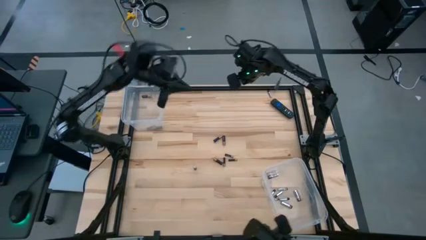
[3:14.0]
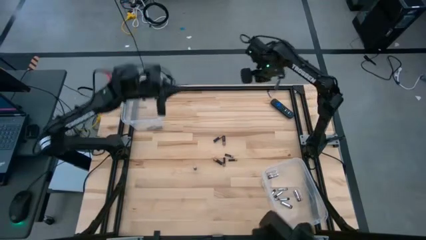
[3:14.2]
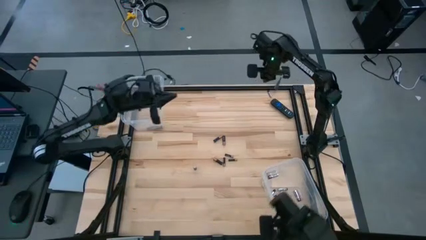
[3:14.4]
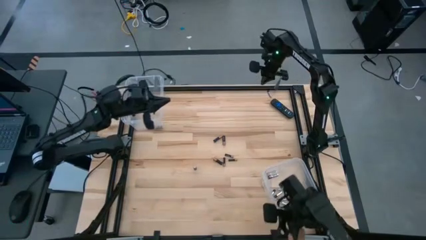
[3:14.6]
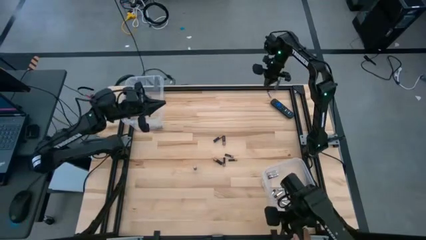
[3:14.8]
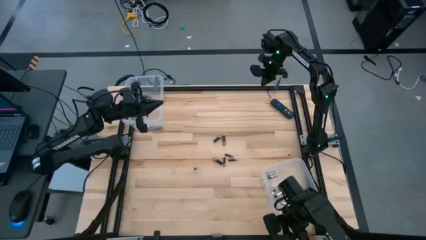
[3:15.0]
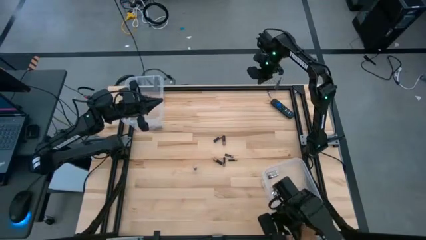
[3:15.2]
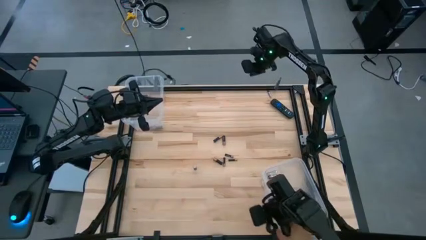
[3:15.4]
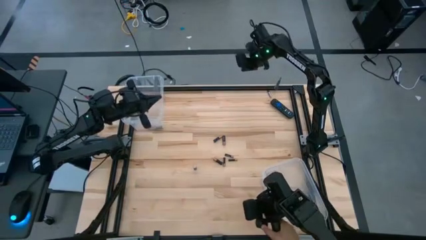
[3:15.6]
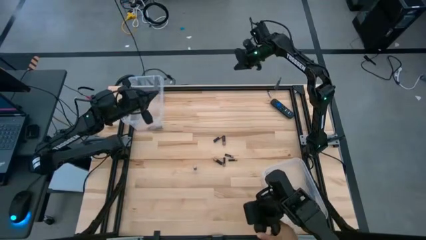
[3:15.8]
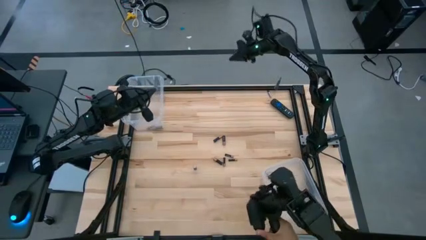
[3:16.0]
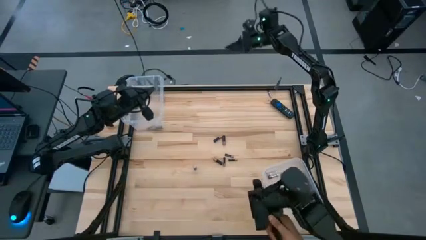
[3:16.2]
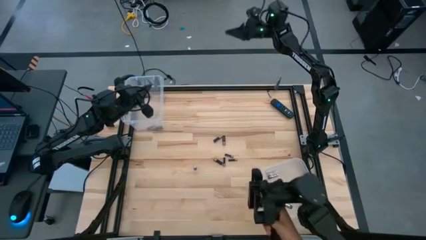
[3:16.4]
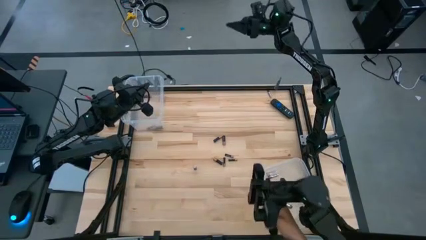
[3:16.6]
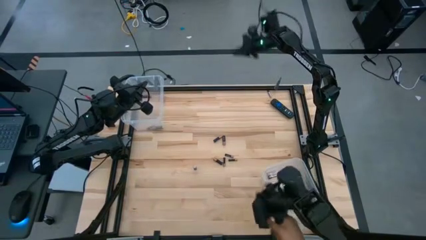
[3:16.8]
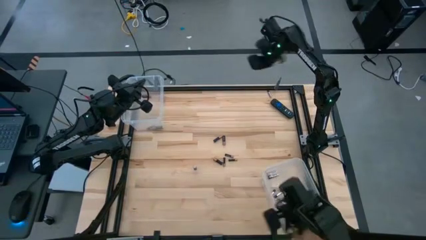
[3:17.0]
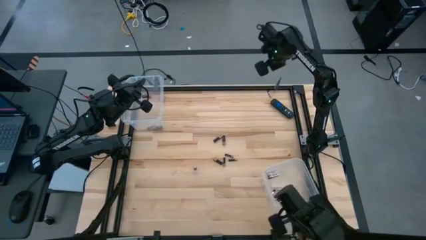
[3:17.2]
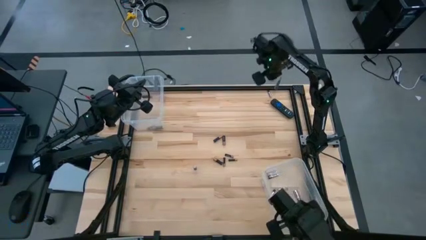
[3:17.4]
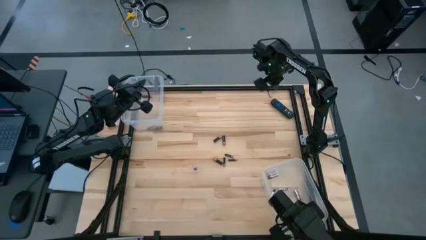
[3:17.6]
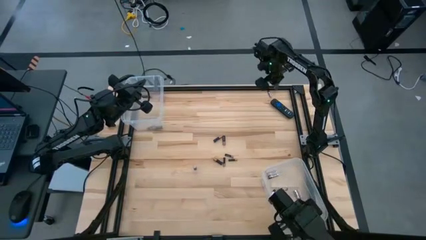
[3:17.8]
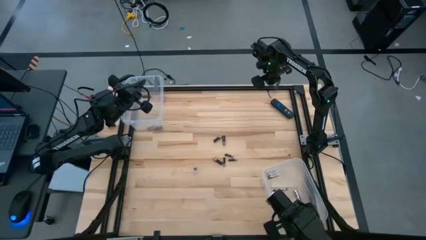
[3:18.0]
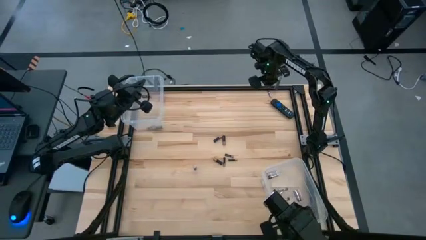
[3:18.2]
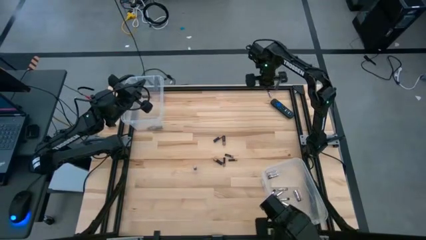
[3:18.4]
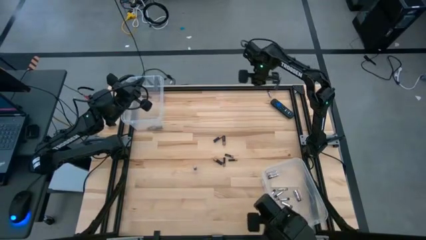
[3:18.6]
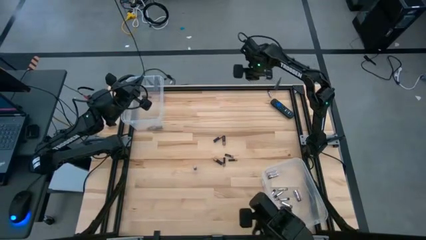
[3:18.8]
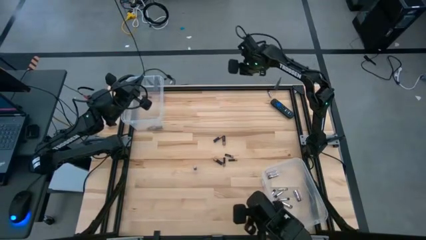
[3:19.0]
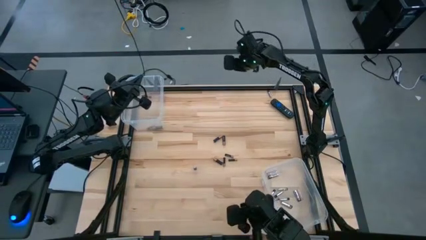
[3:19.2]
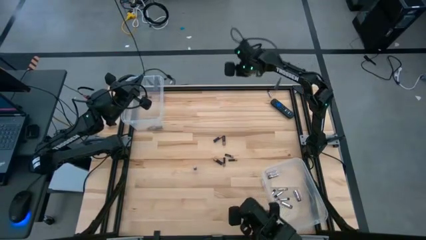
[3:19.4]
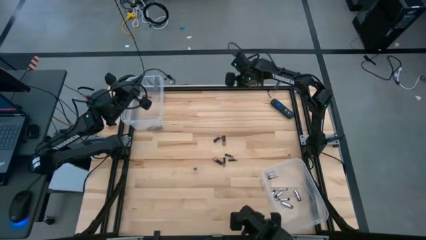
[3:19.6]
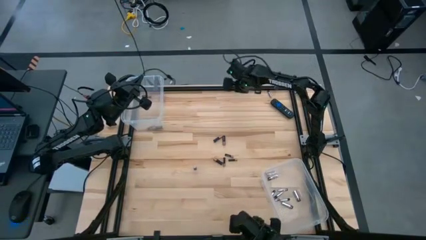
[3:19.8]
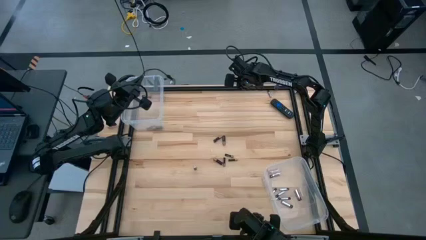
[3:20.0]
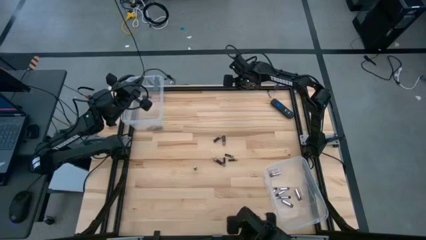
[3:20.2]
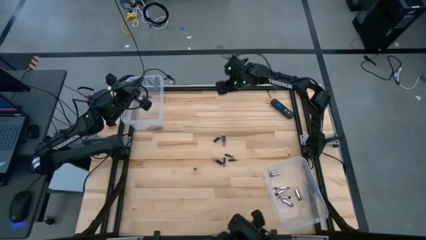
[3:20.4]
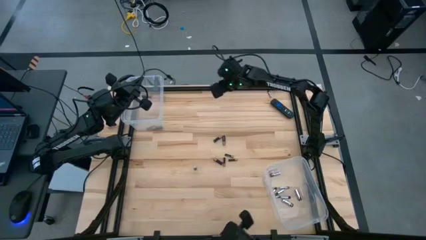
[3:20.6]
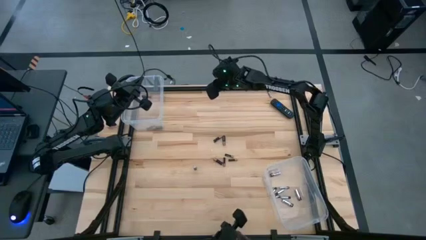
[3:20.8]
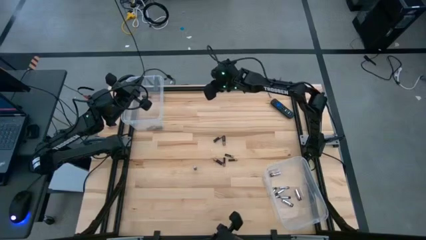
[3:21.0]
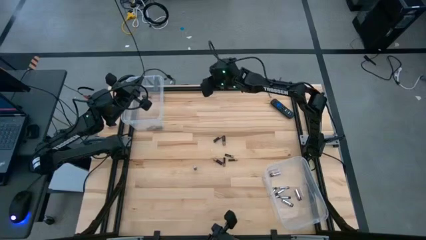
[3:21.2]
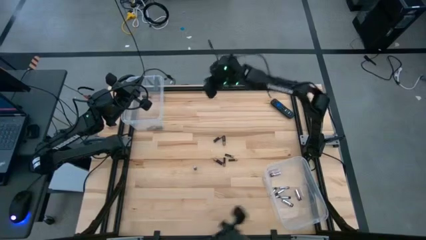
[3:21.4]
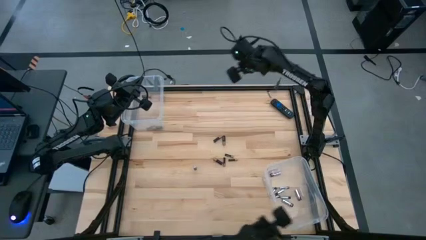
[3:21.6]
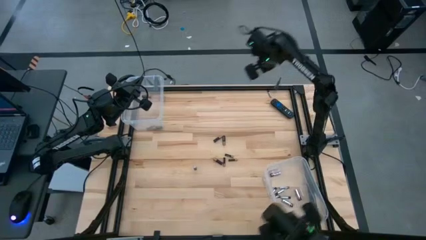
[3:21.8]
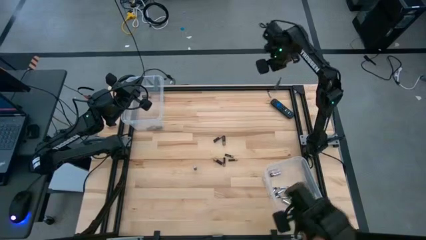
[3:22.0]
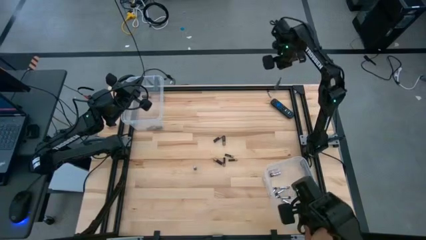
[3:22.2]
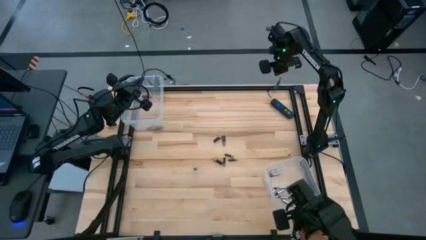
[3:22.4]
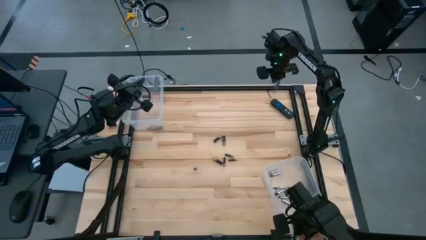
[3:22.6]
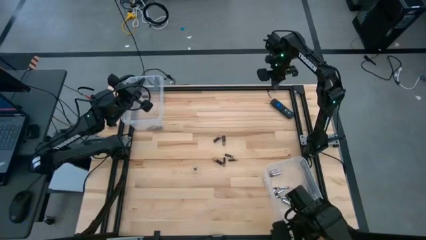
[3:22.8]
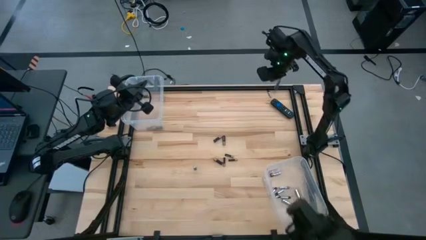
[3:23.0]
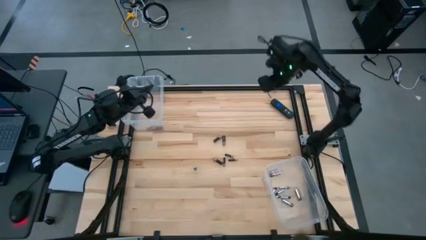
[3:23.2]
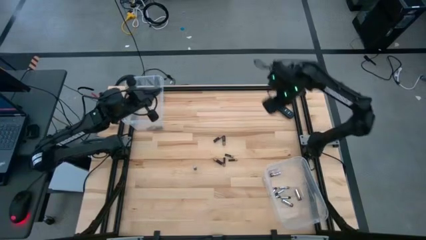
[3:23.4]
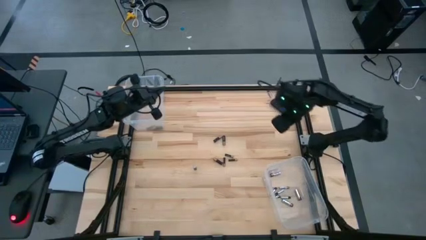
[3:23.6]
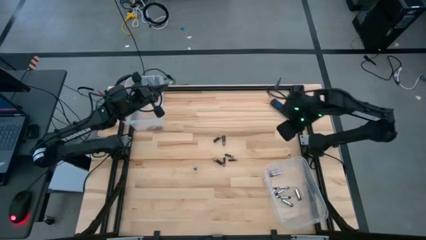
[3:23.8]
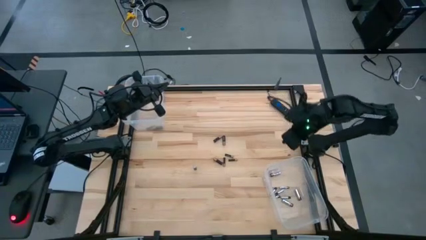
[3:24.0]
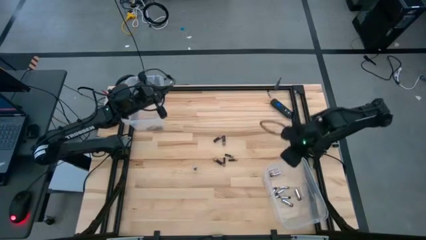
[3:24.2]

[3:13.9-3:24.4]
Task: Sort batteries
Put the black and silver battery into the bottom transparent bin

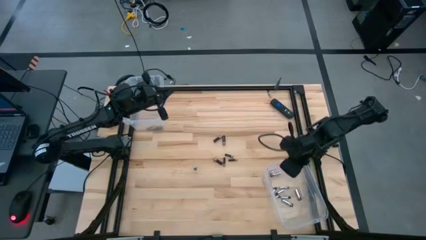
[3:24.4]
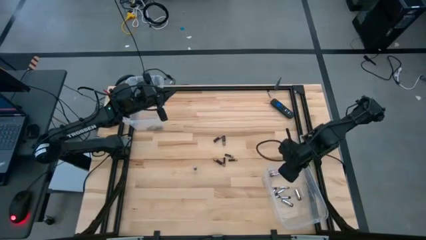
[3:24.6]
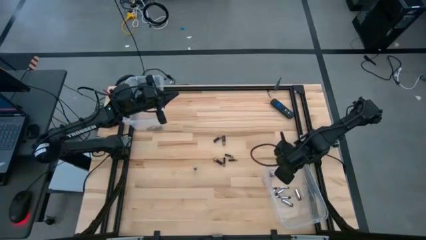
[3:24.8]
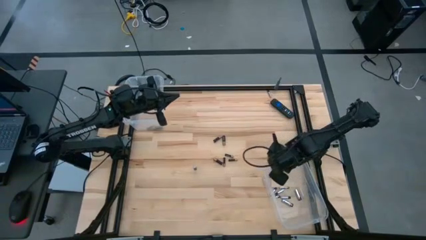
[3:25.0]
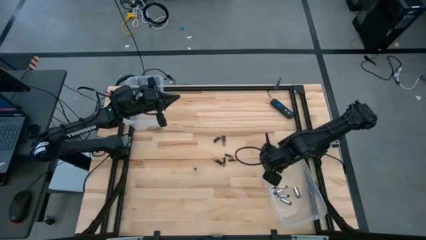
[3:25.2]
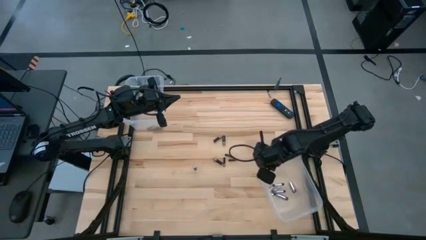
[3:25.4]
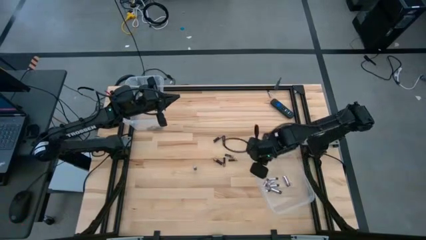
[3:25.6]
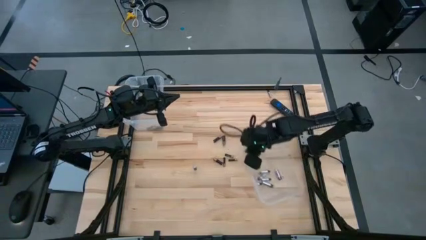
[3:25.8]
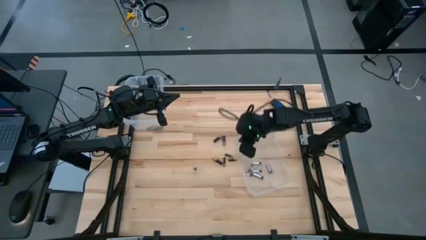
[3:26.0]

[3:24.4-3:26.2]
Move the bottom transparent bin to the middle right of the table

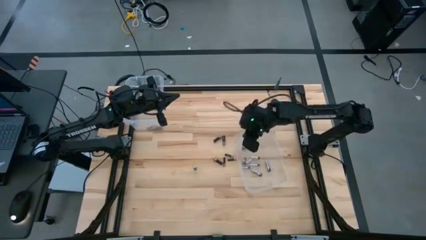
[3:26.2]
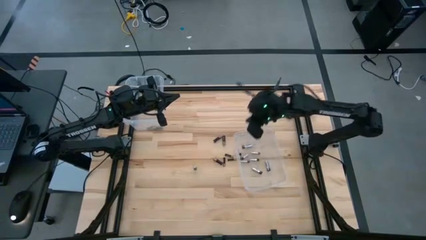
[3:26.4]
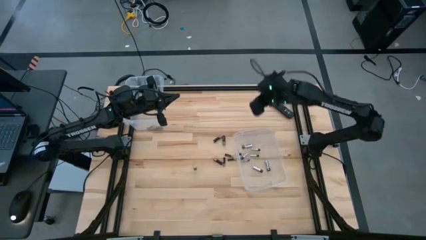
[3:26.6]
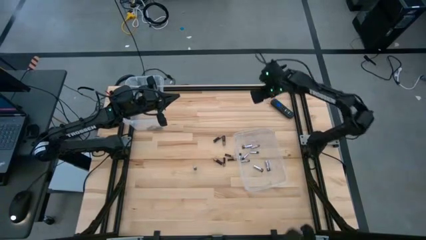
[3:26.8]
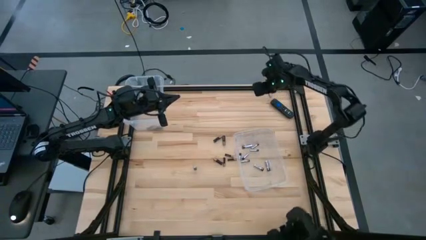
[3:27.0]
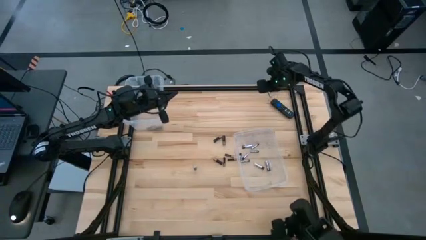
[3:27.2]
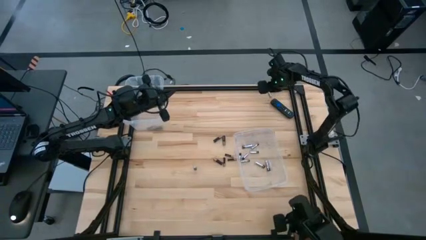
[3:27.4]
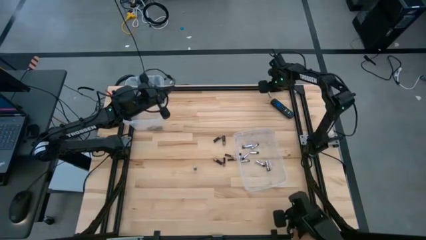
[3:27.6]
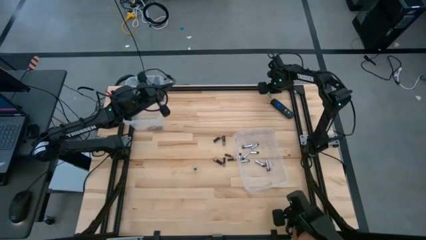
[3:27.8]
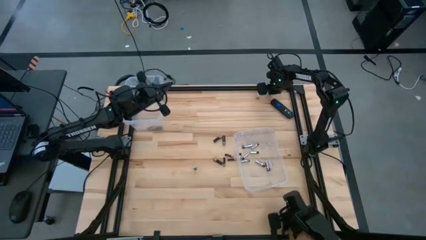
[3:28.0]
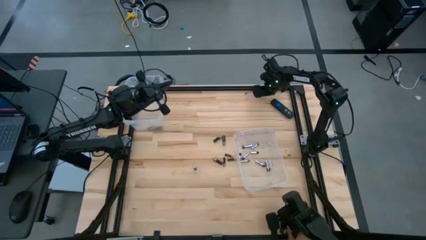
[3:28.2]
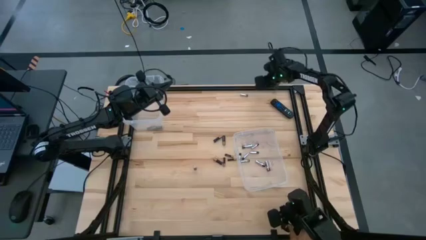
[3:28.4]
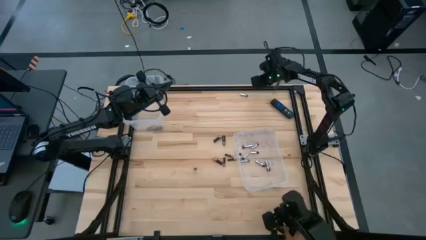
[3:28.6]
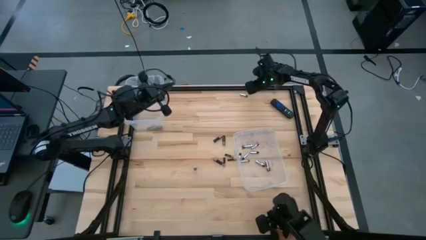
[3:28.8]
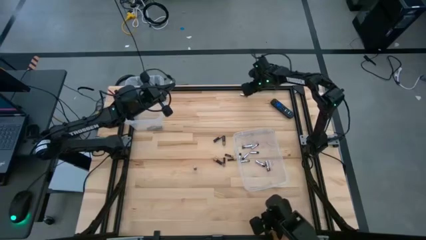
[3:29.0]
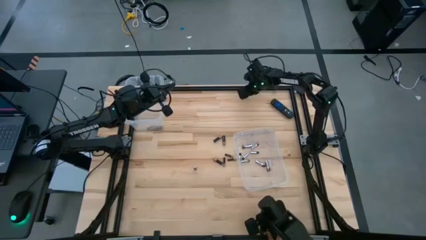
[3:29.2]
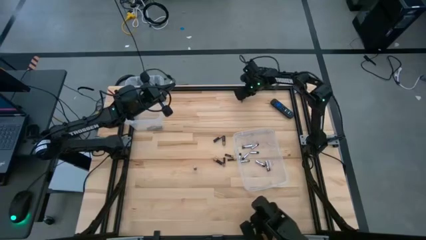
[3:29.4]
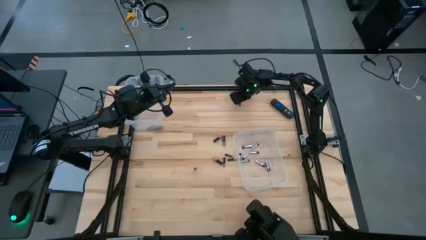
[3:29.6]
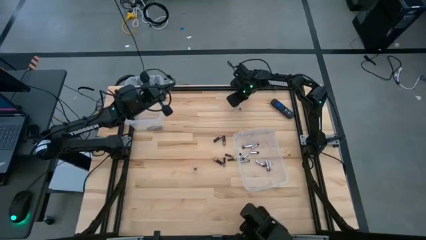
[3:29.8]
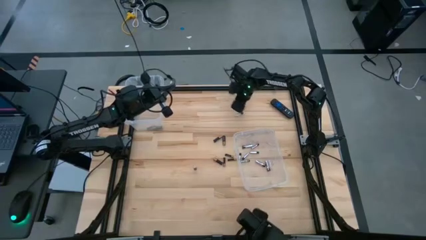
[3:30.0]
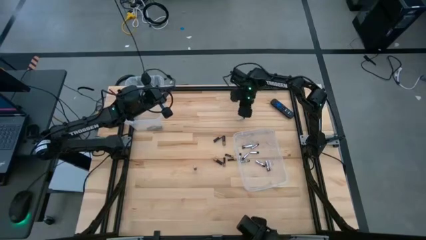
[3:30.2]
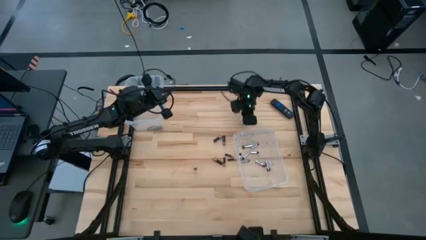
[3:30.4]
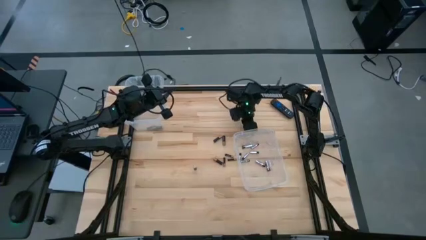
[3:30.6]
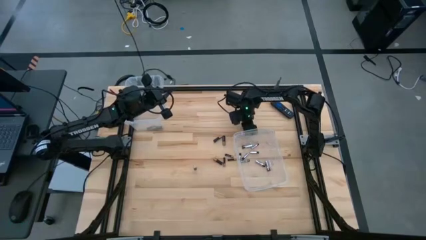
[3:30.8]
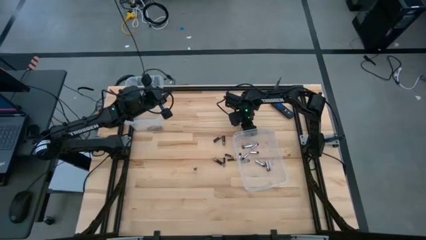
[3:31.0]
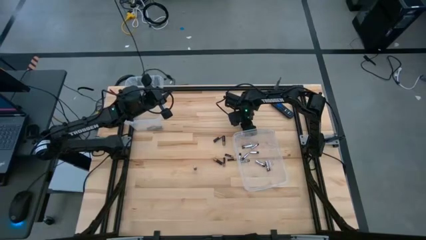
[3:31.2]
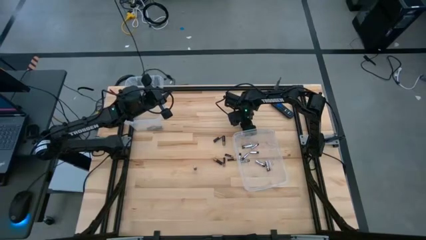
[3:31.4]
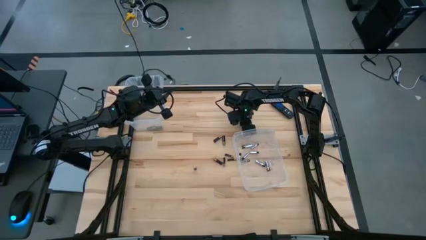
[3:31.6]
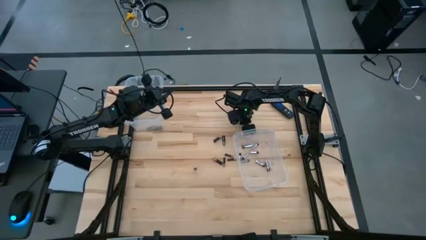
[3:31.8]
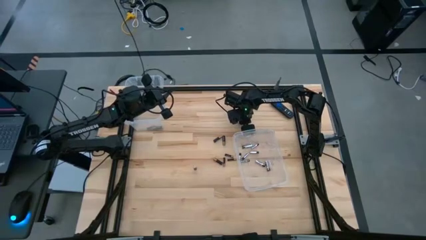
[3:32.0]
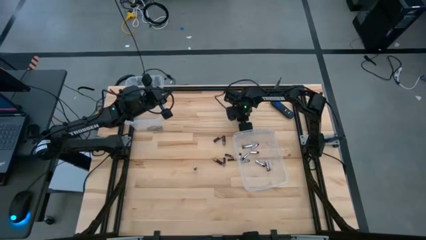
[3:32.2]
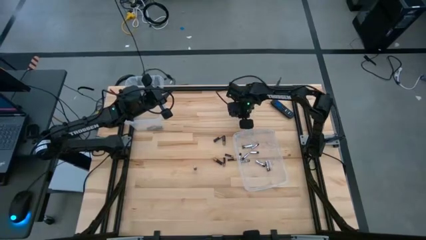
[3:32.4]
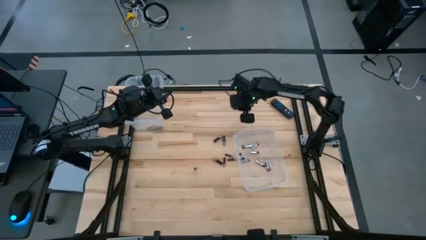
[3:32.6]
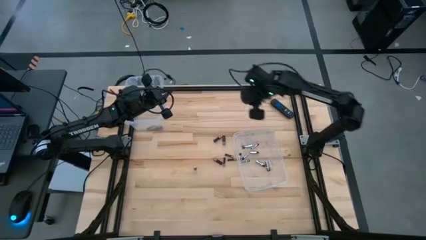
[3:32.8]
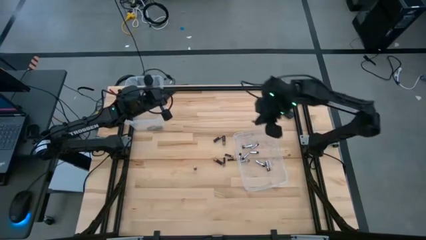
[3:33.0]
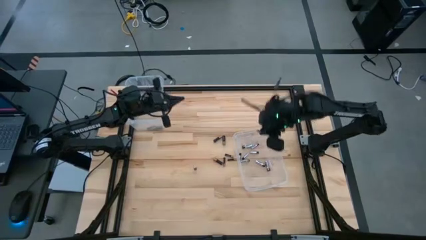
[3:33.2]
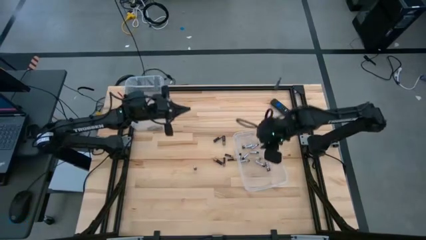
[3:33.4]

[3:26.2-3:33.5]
Put the black and silver battery into the bottom transparent bin
